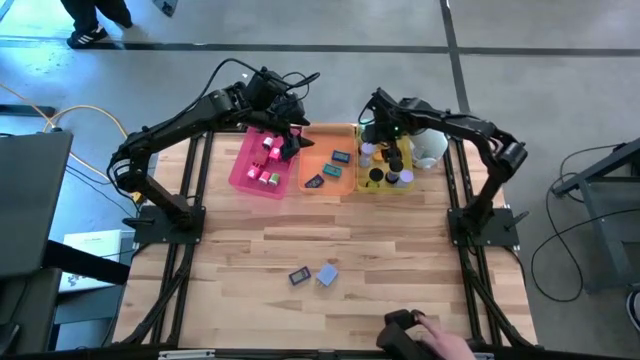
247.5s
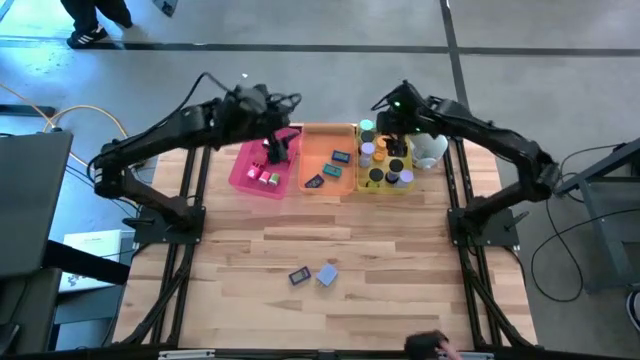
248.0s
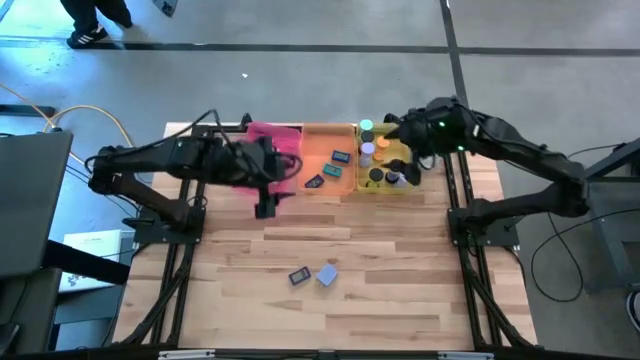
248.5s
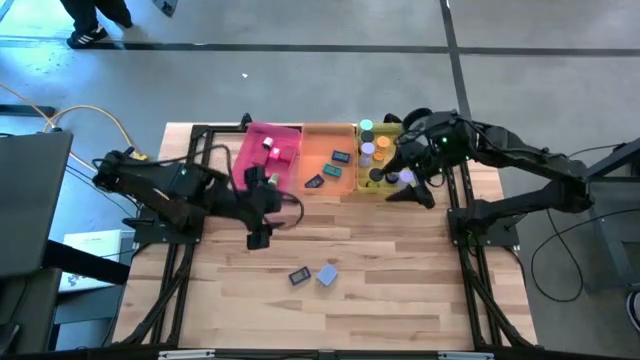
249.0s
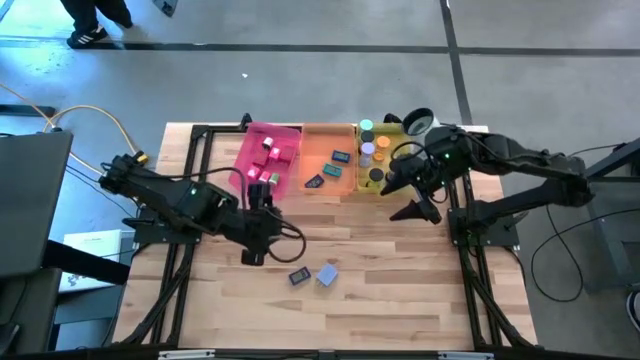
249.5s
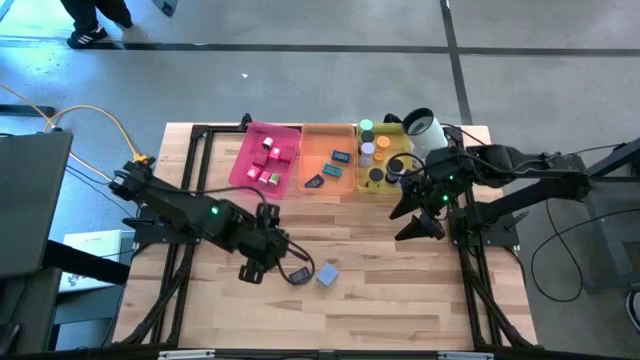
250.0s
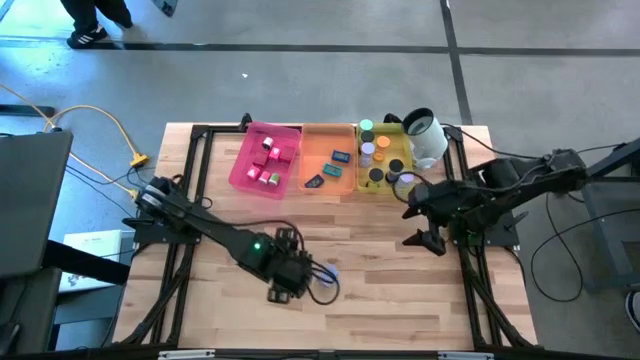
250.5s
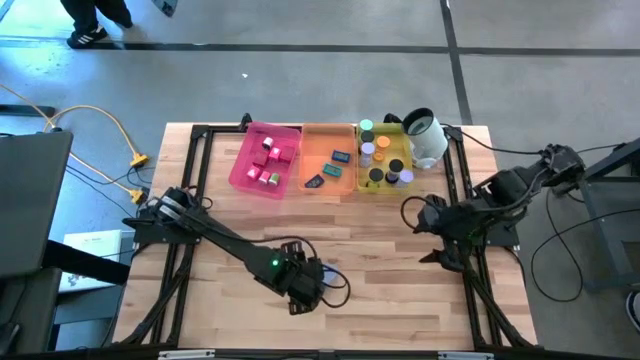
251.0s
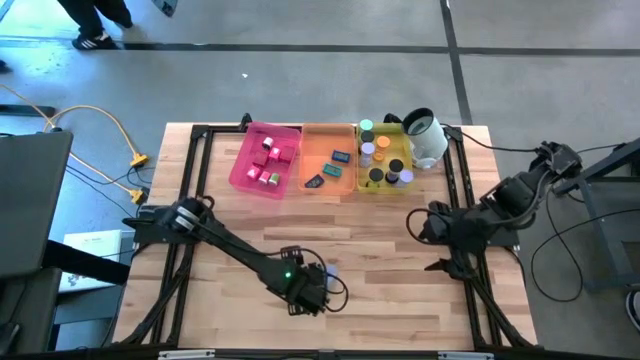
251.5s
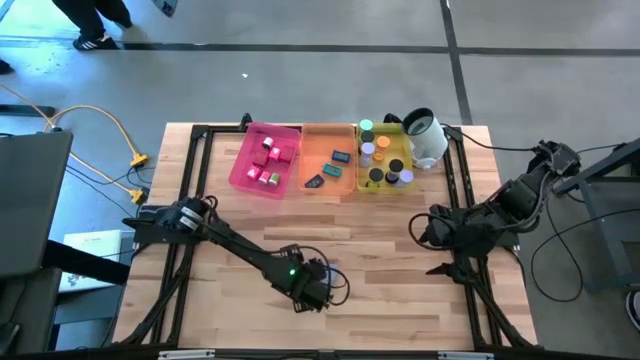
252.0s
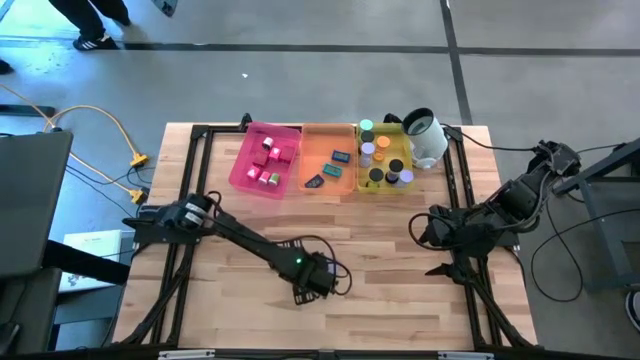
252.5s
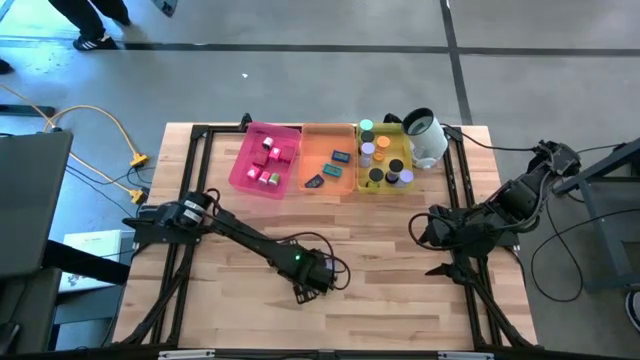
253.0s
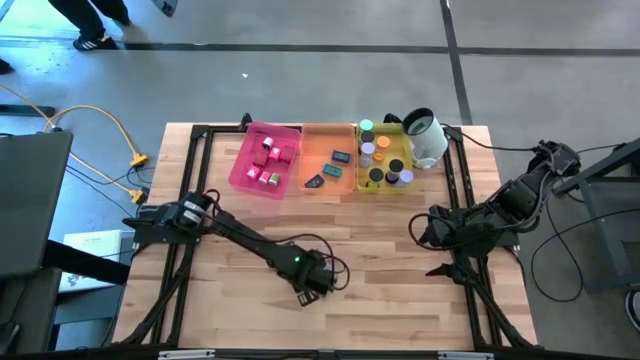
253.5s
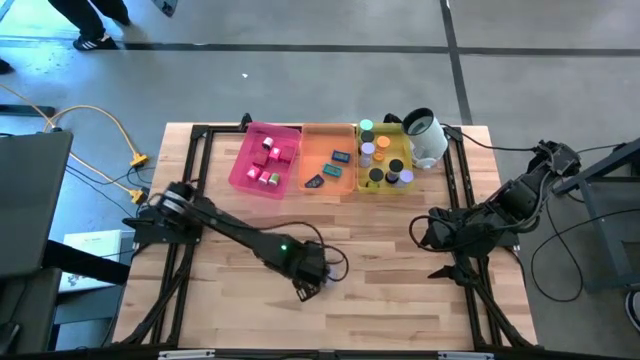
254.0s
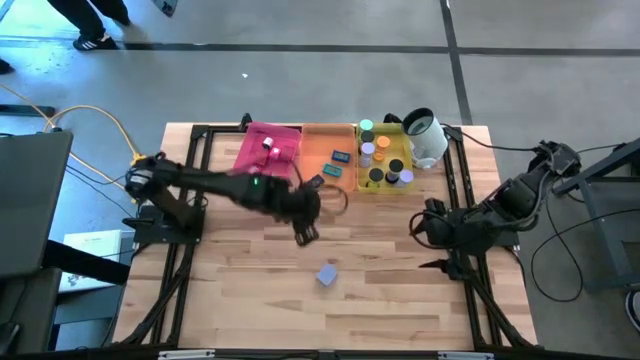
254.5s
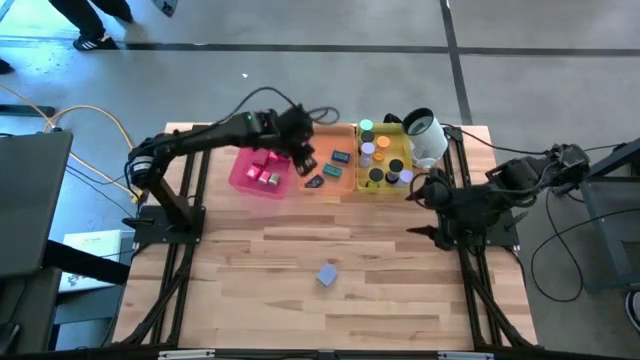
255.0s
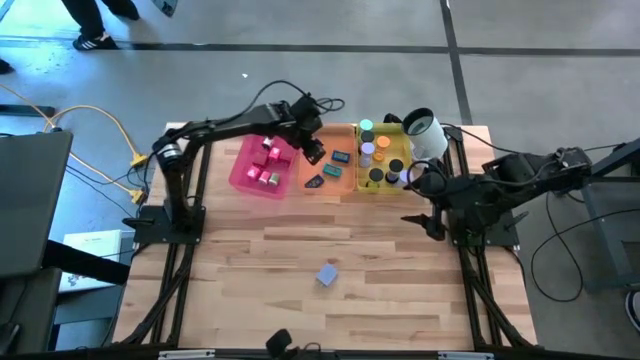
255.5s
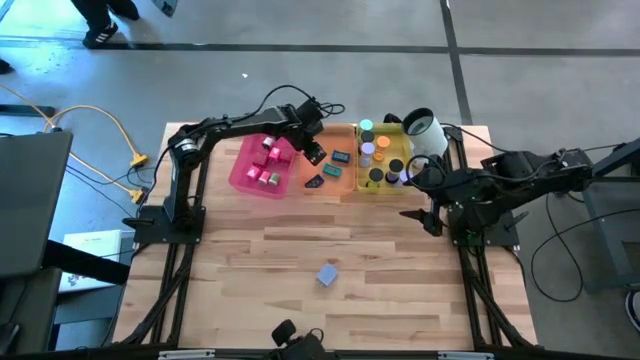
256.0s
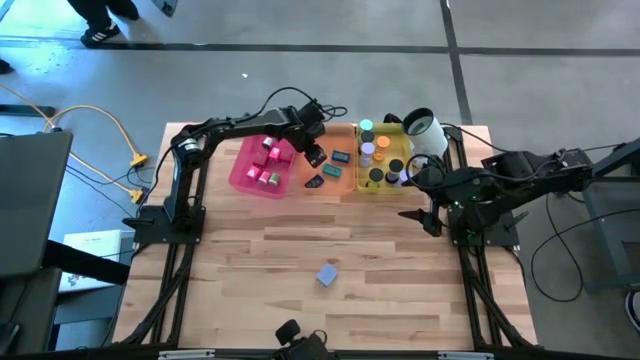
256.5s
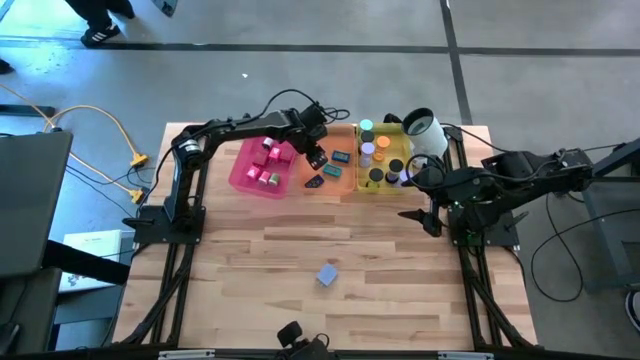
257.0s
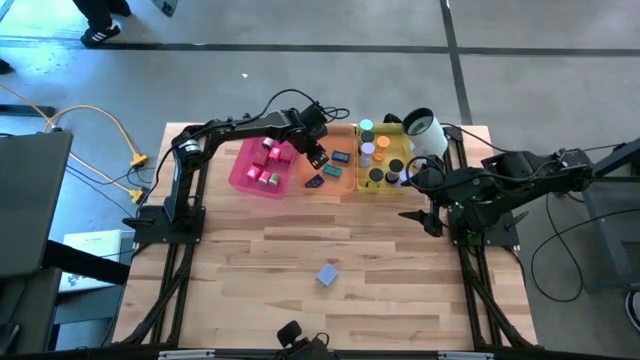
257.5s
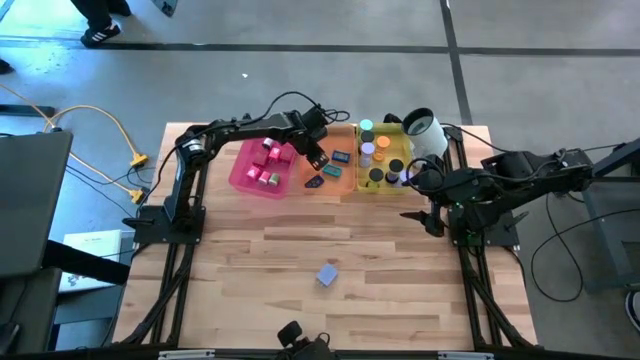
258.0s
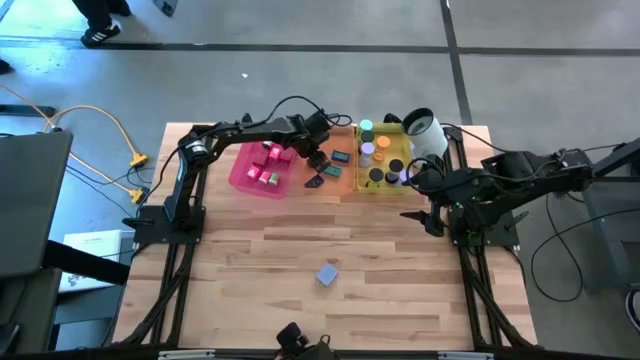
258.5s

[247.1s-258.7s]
Task: Pick & Place Office items
Put the dark blue digital clock into the orange bin

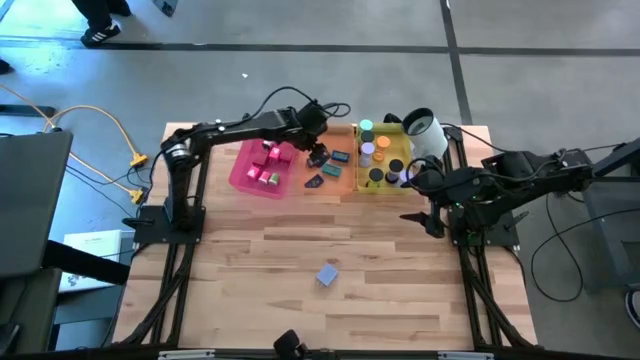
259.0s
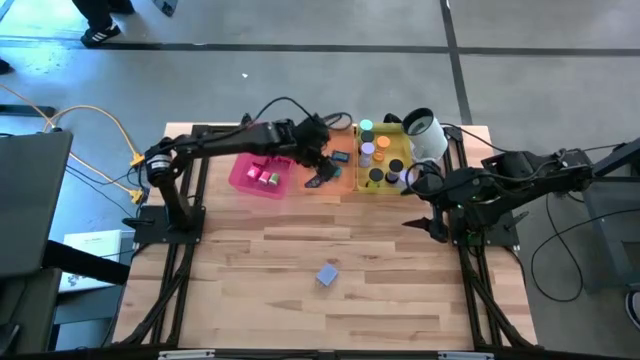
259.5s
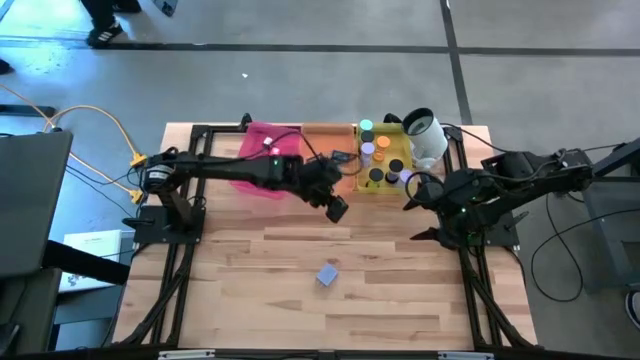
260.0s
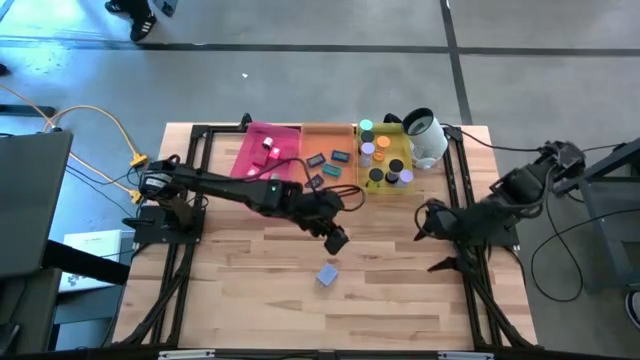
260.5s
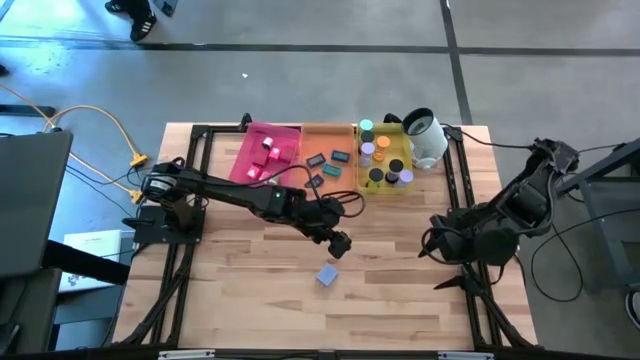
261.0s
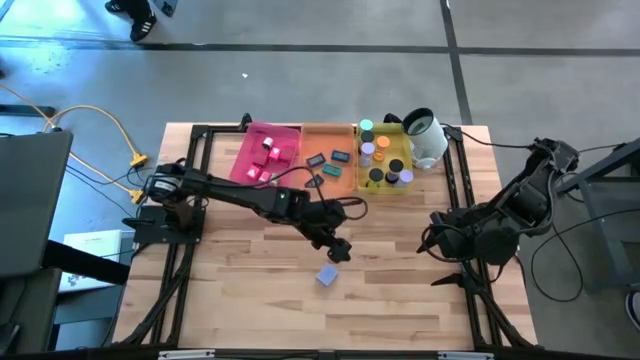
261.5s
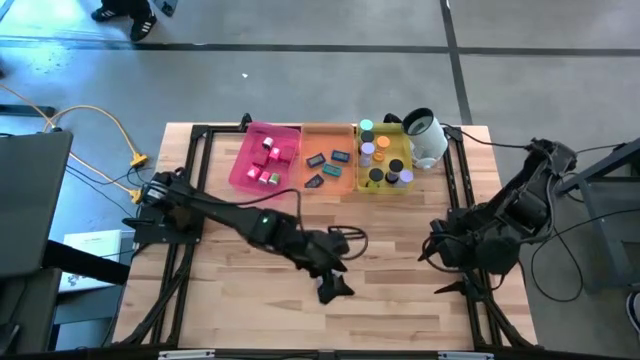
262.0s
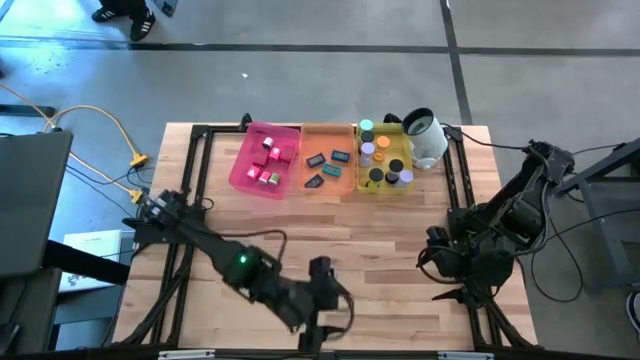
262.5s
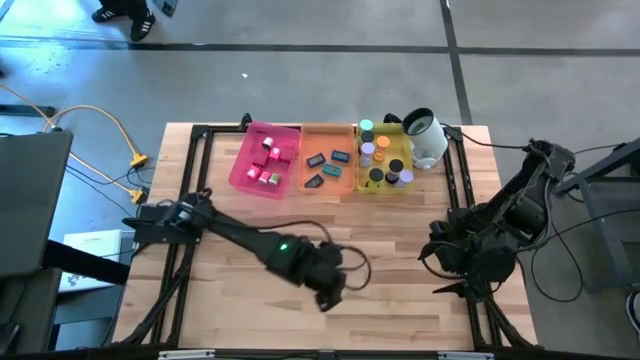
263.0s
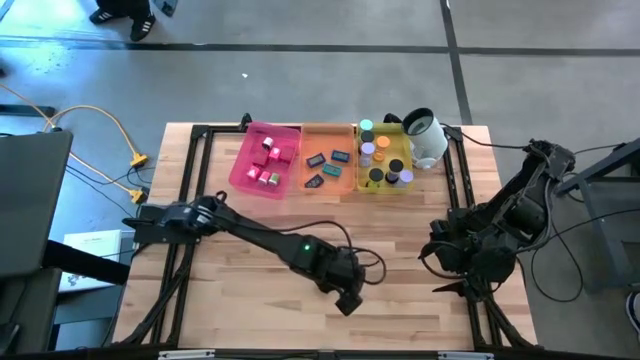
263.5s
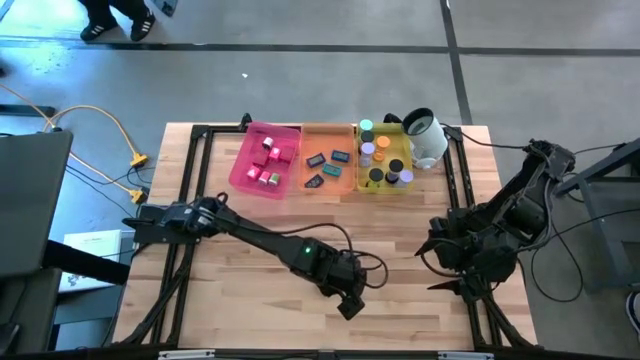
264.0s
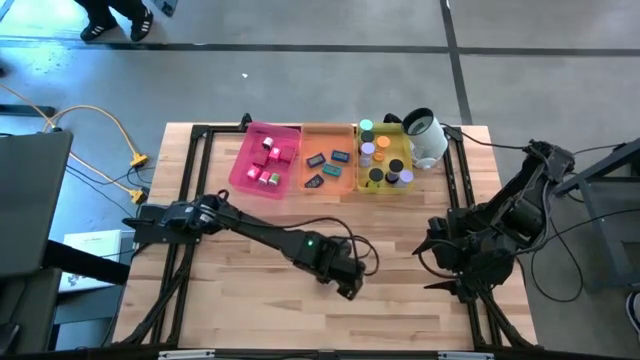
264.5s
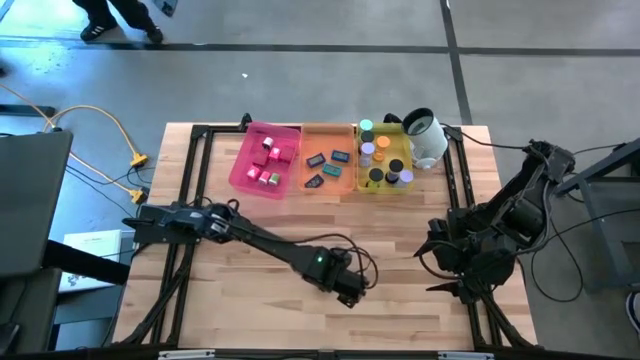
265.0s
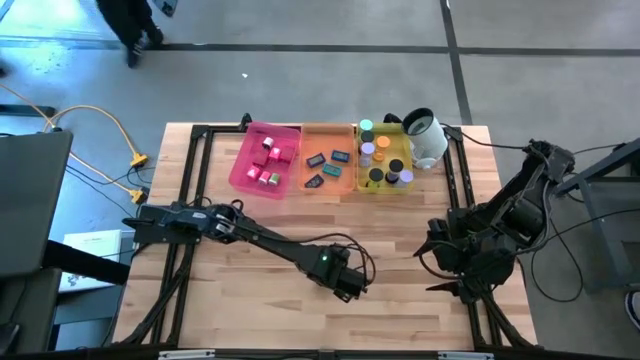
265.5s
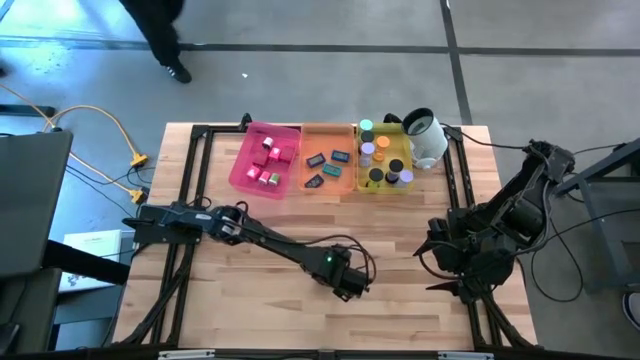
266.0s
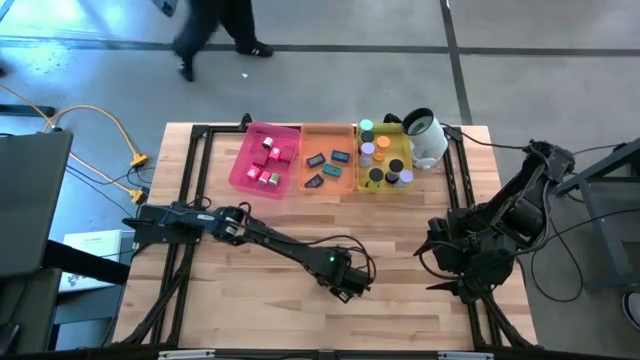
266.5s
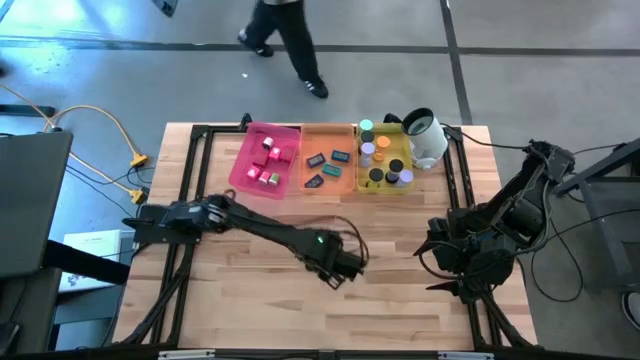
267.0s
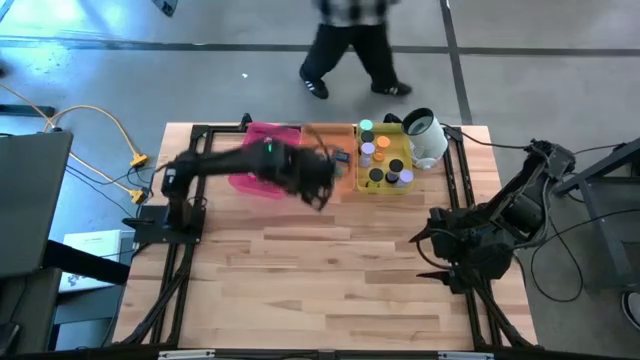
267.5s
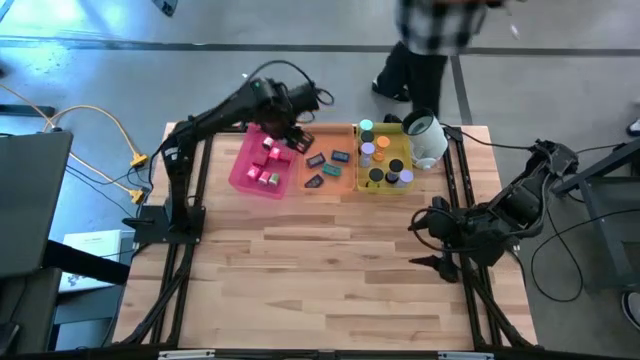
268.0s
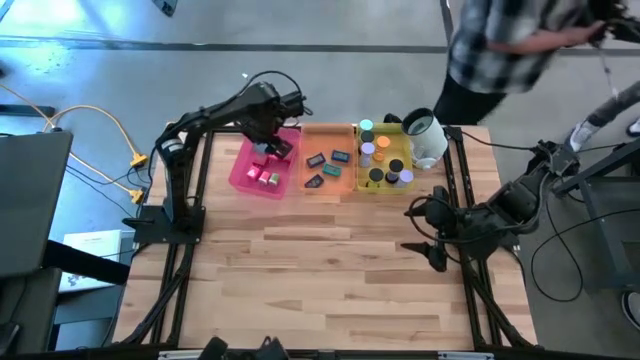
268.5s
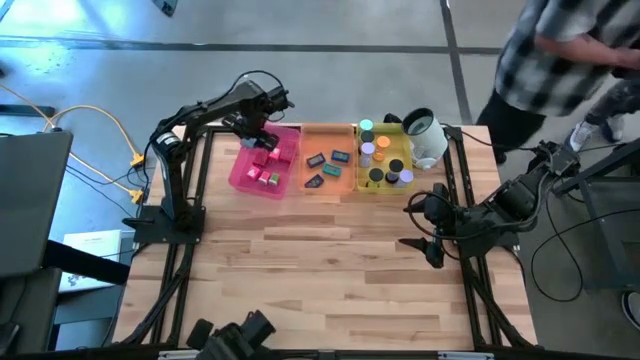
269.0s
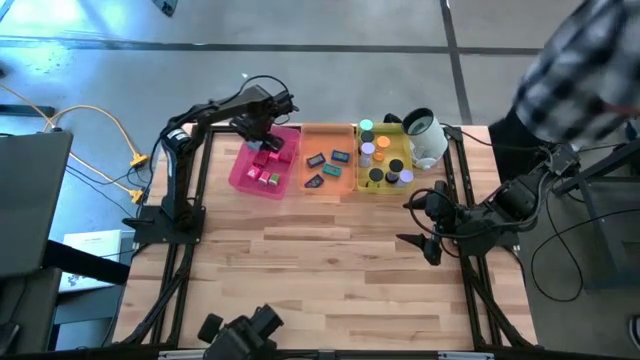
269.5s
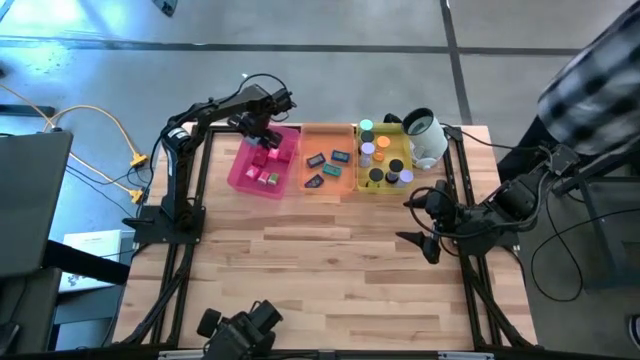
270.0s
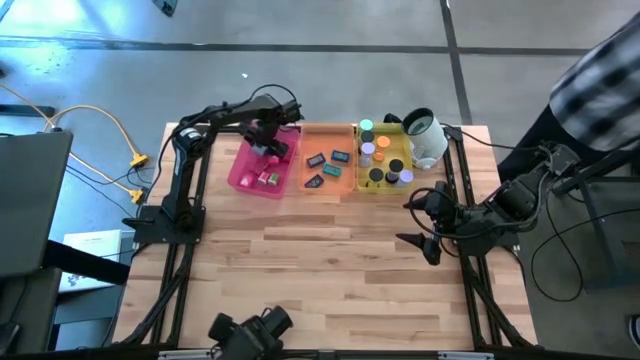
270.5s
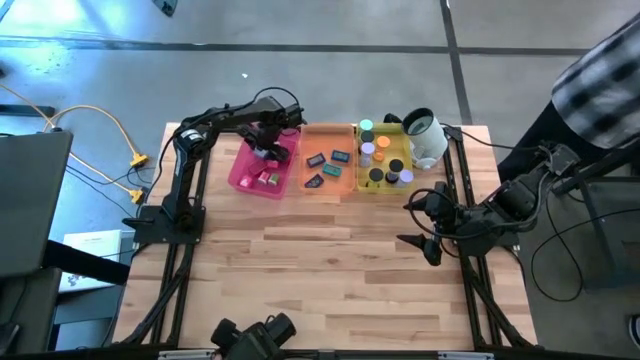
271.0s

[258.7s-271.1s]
Put the violet charger adapter into the pink bin
